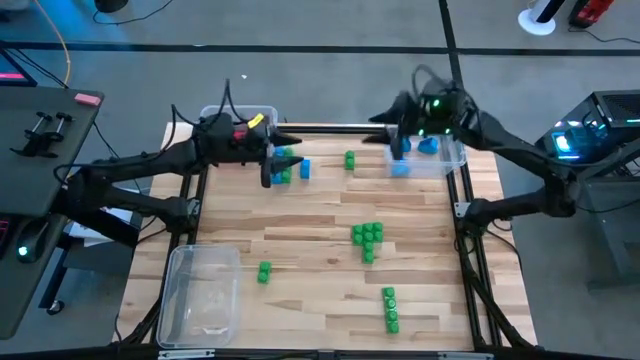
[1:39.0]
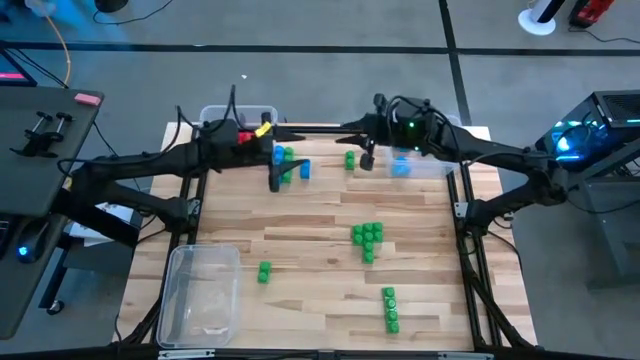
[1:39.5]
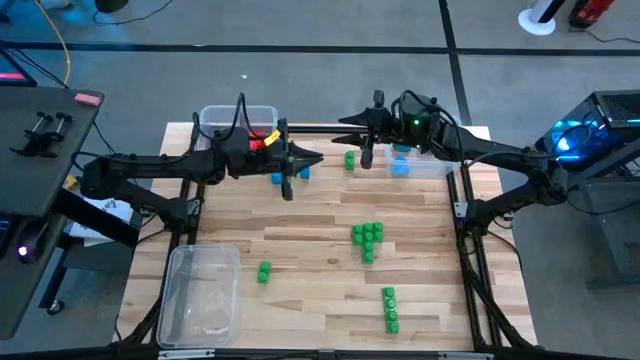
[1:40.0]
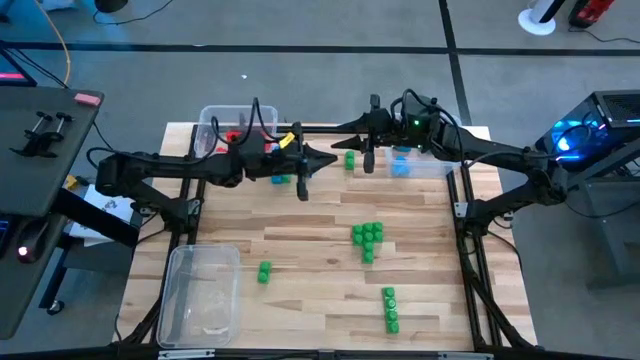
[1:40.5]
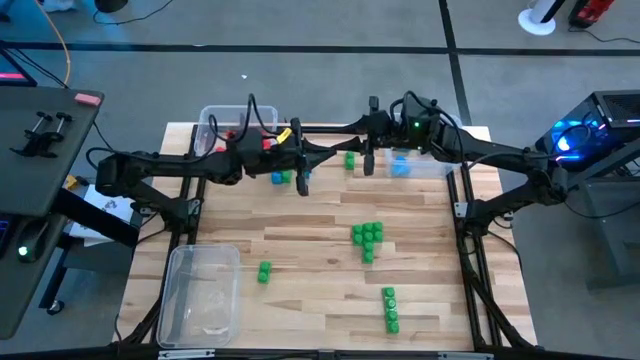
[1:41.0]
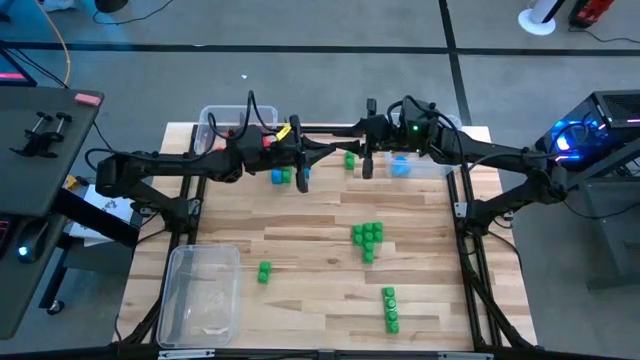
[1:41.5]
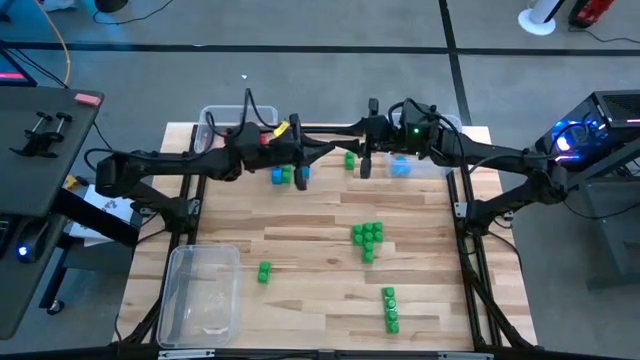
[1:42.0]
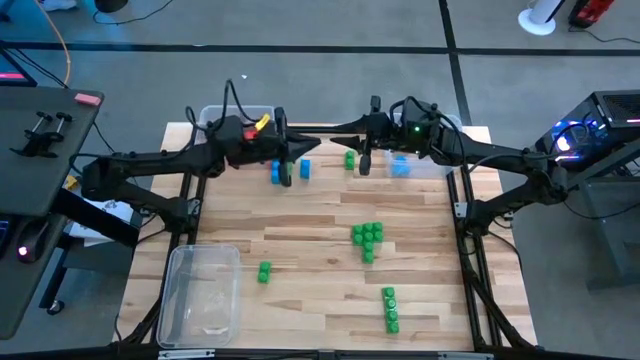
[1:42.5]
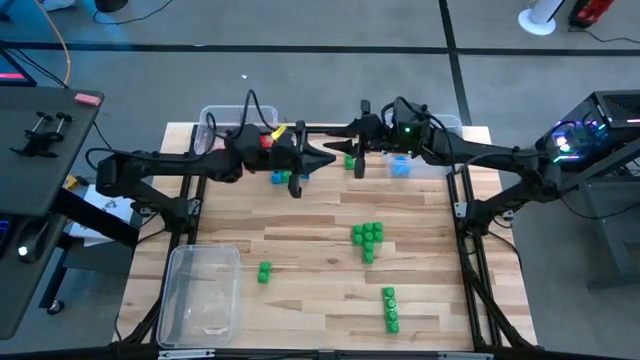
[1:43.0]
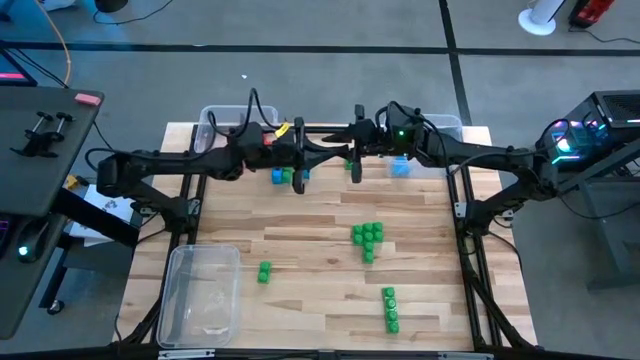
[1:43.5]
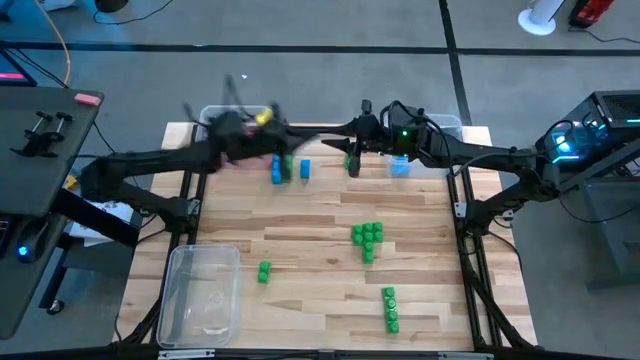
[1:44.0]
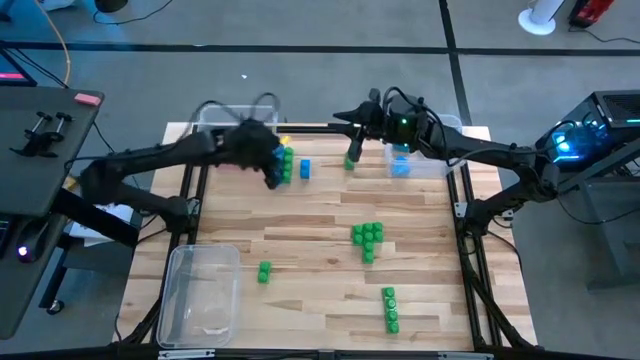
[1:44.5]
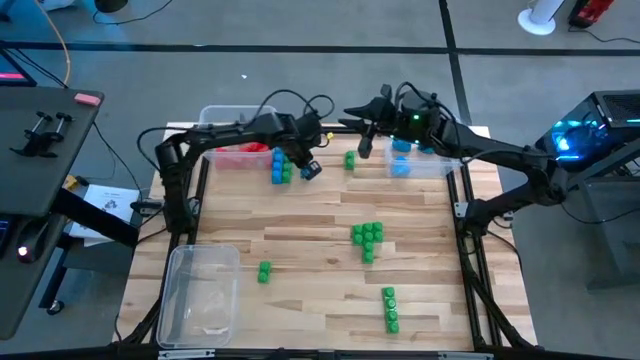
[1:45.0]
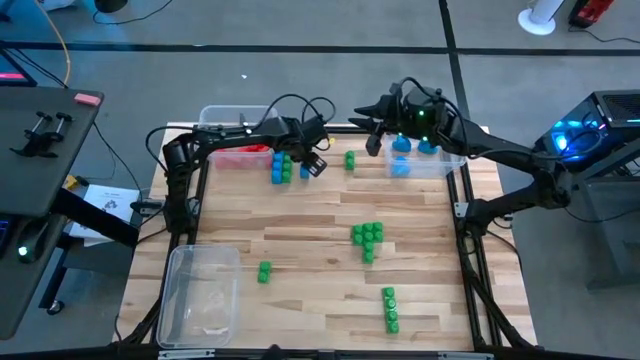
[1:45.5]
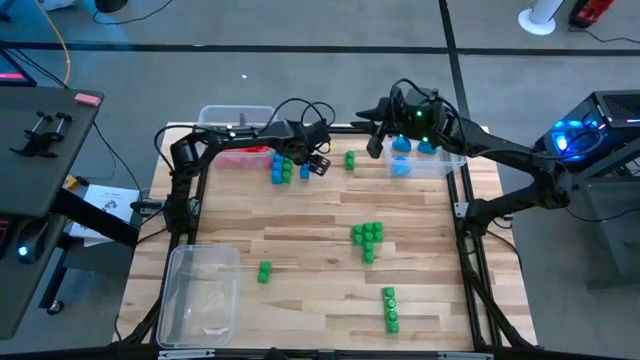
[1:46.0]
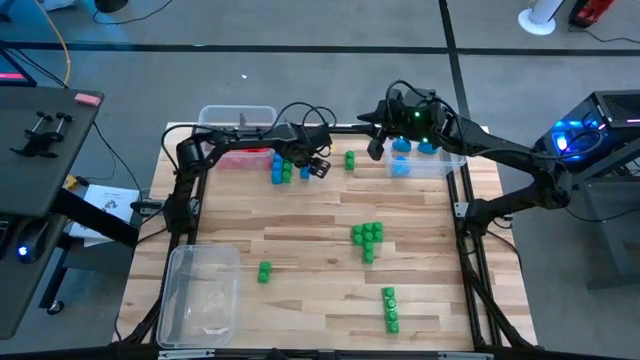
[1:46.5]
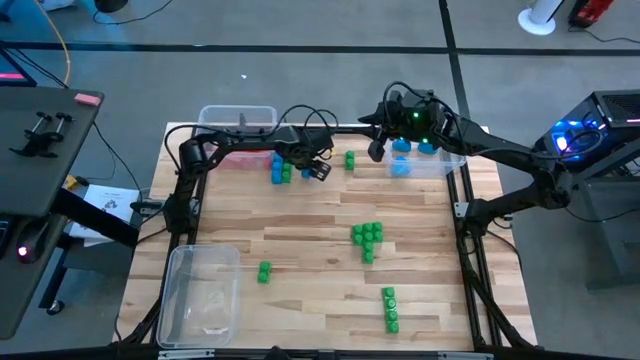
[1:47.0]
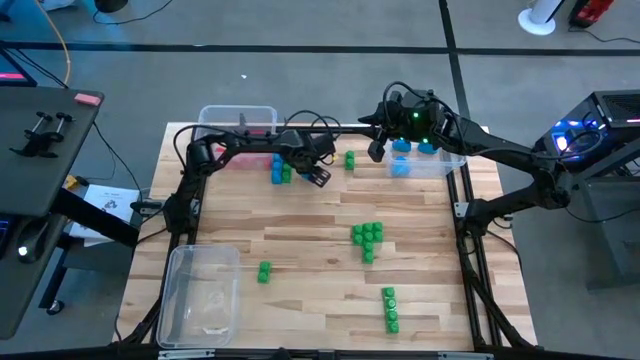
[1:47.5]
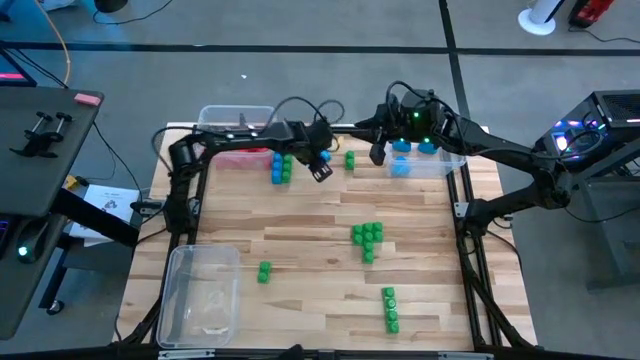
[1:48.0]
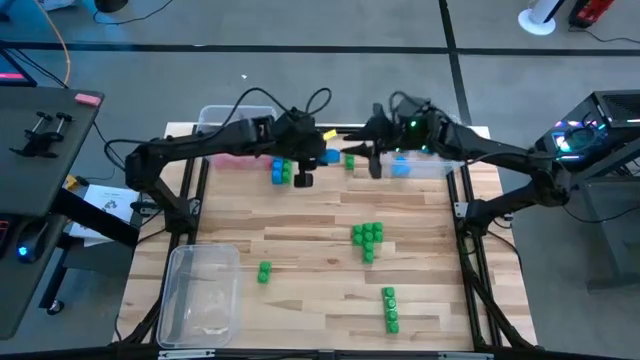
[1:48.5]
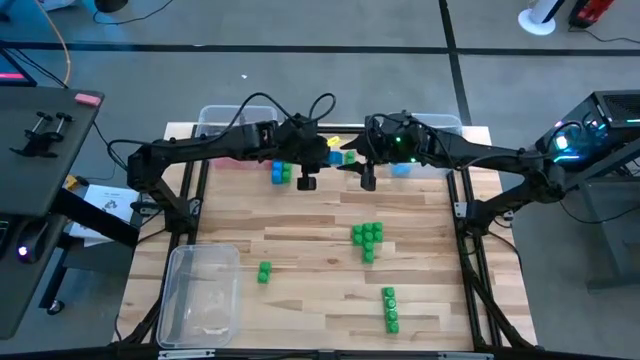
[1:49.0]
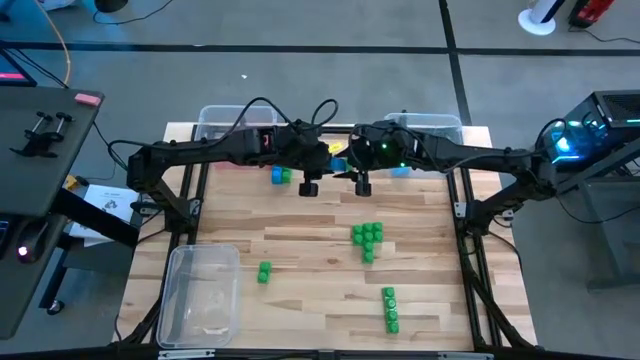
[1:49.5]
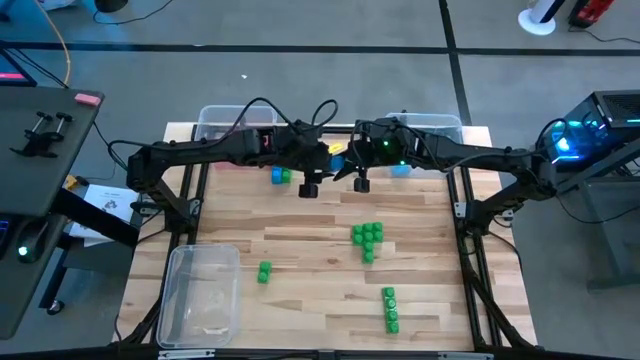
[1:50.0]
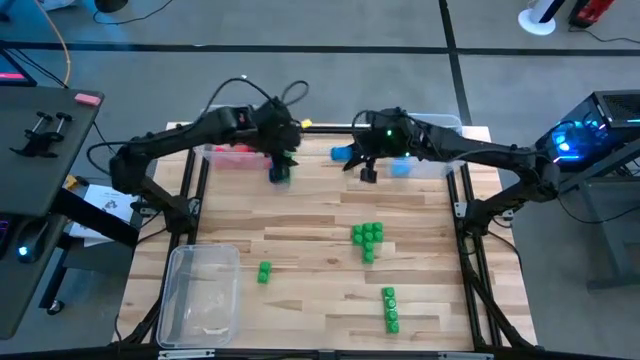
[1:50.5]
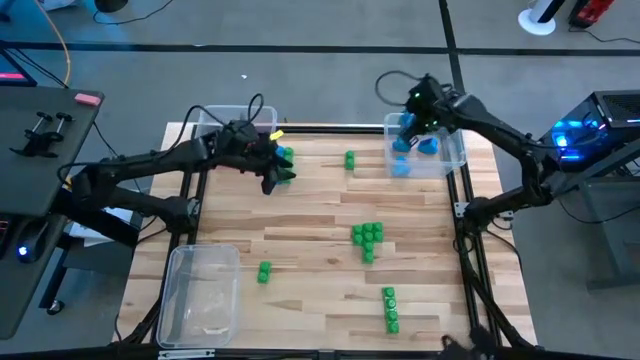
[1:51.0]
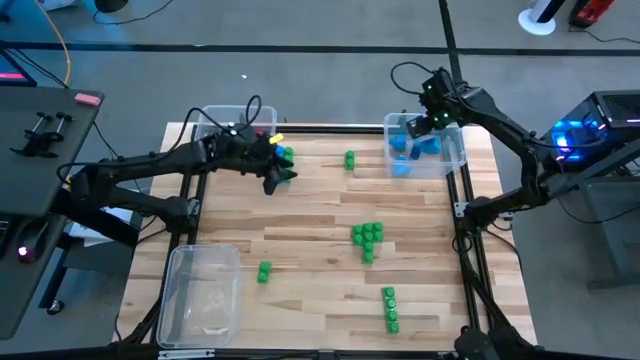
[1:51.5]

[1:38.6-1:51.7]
Task: Sort blocks
Put the blue game piece into the top right transparent bin

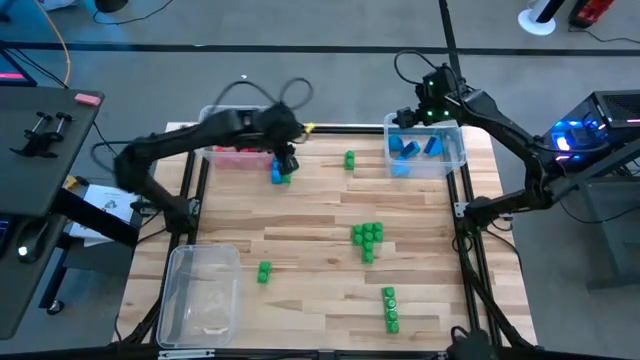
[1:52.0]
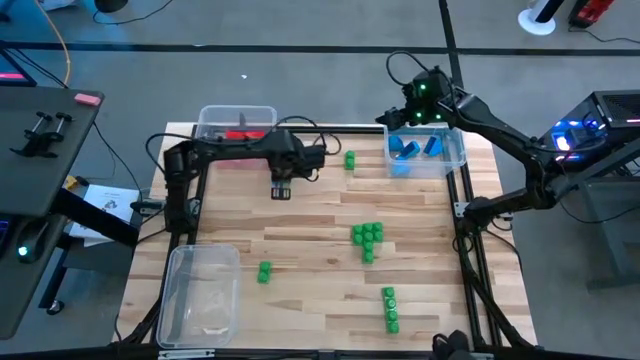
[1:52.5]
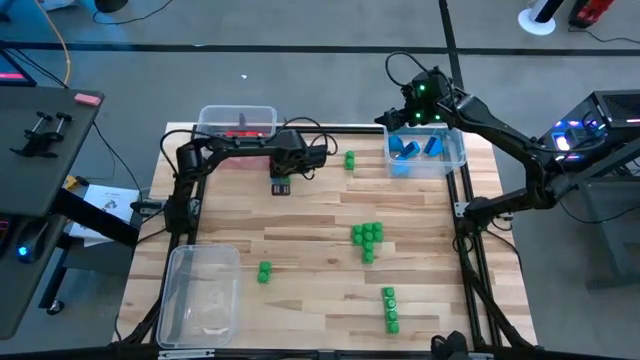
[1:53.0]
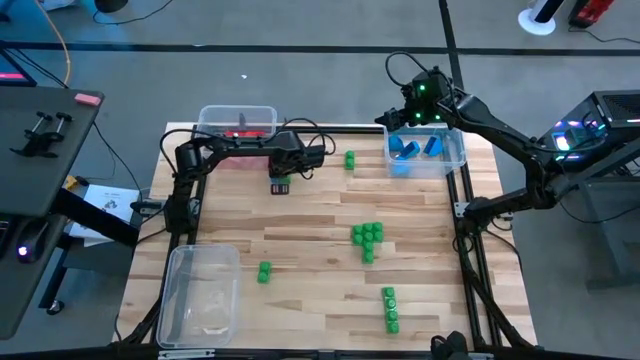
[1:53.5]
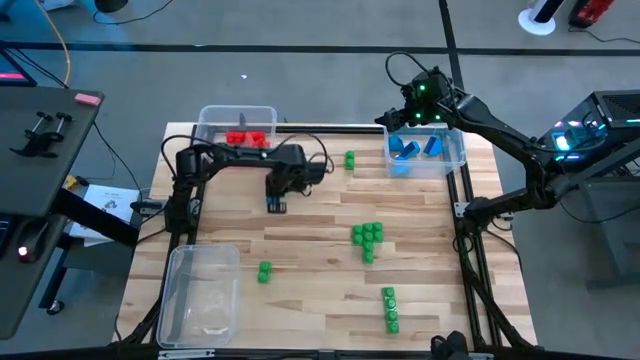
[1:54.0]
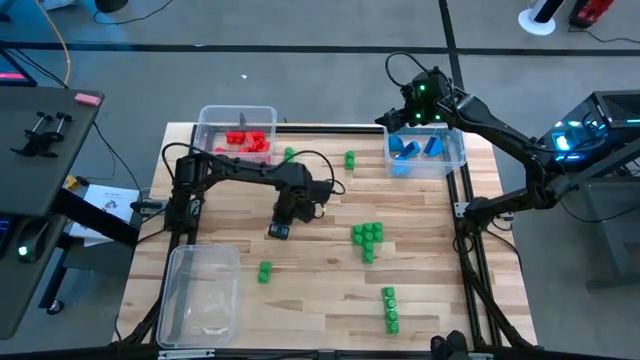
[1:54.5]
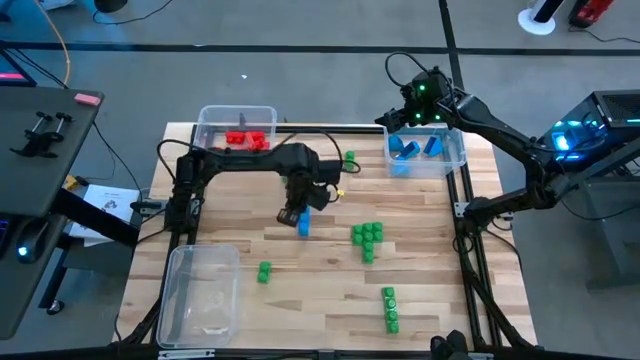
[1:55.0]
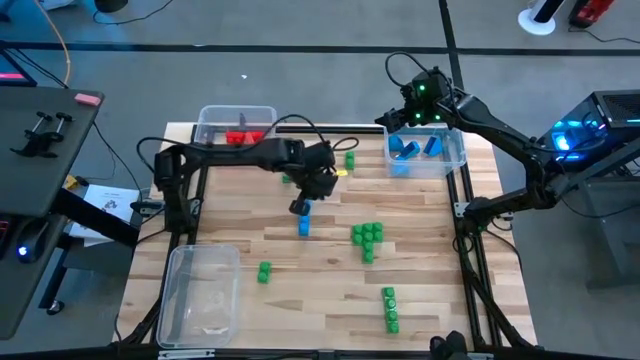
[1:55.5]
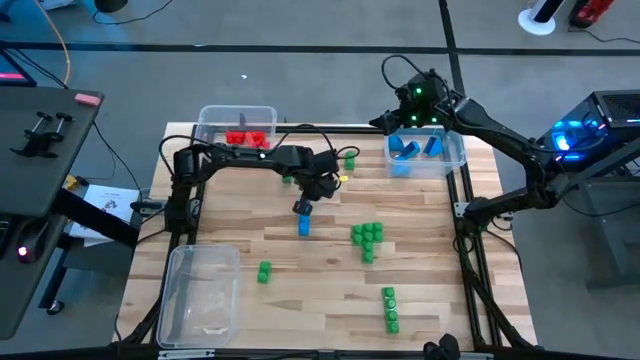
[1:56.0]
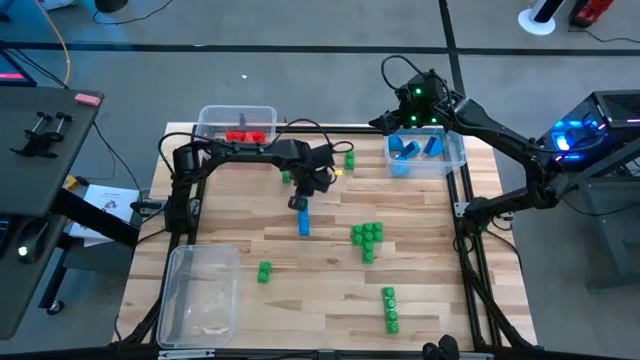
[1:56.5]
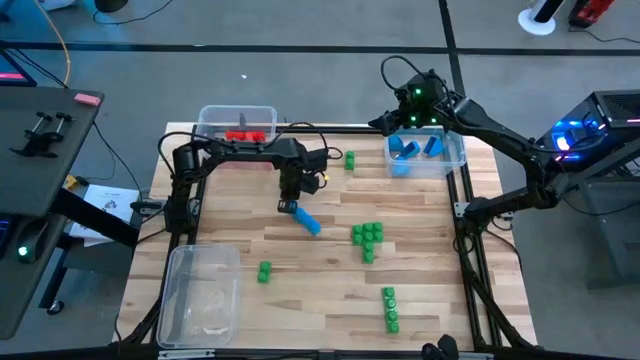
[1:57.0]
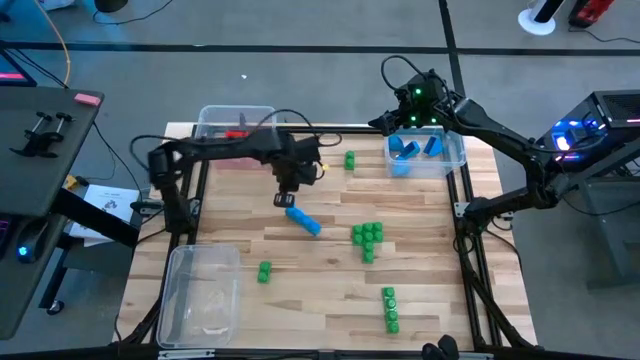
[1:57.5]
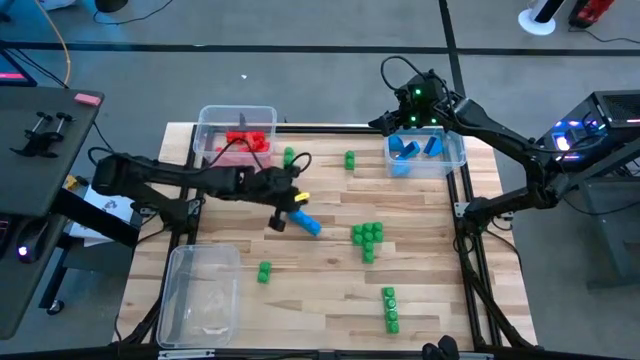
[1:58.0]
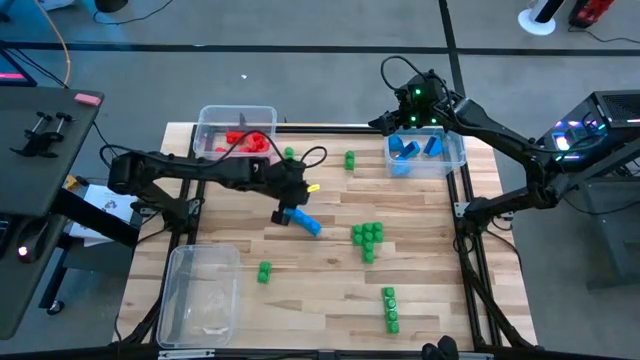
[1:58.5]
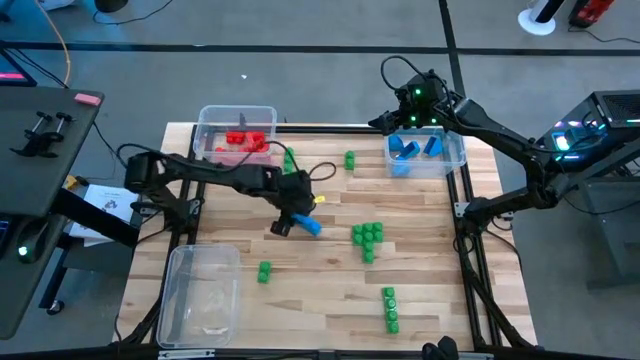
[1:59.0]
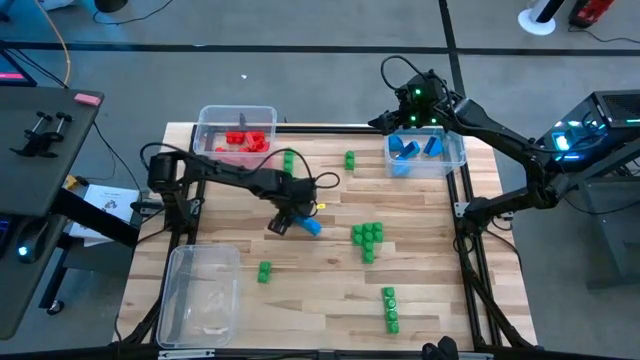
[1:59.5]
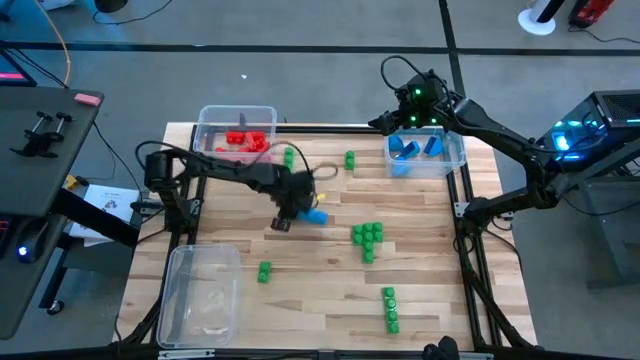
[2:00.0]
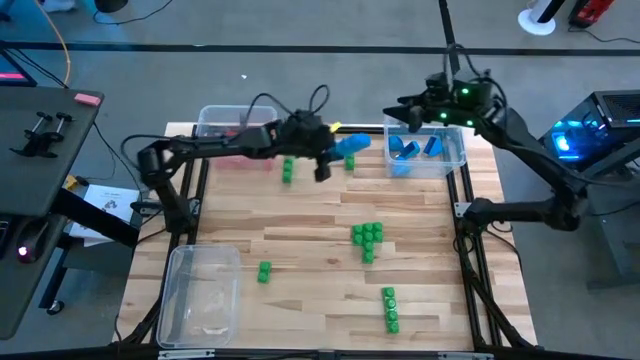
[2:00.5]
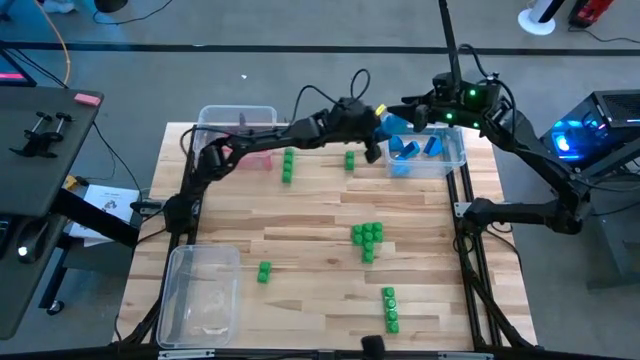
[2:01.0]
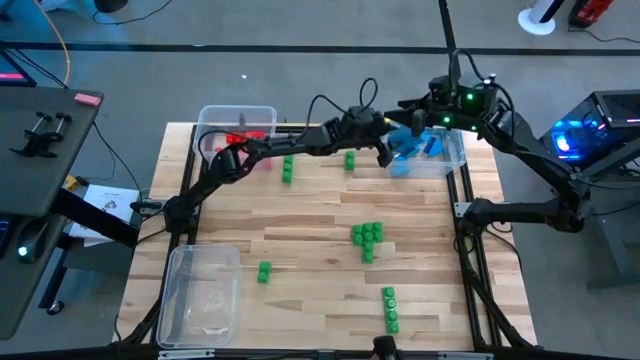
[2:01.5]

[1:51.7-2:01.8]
Put the blue game piece into the top right transparent bin
